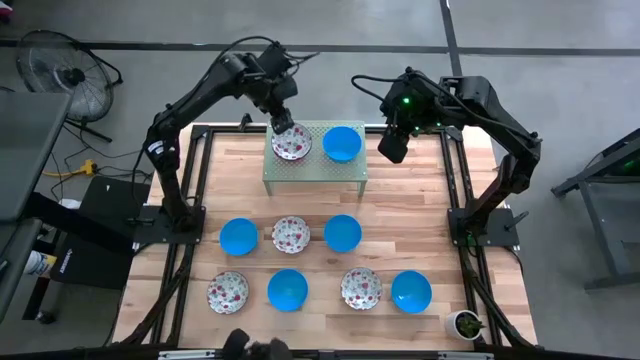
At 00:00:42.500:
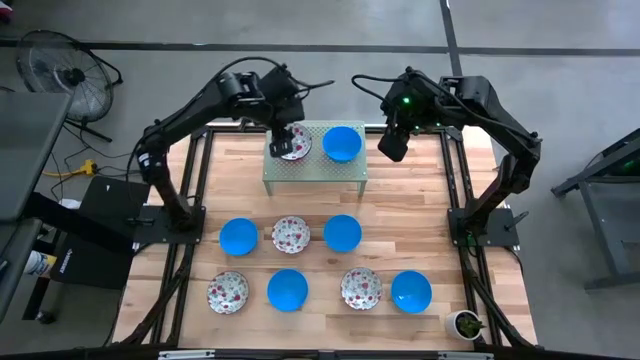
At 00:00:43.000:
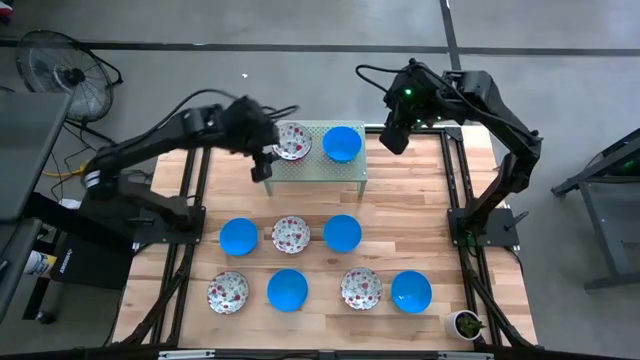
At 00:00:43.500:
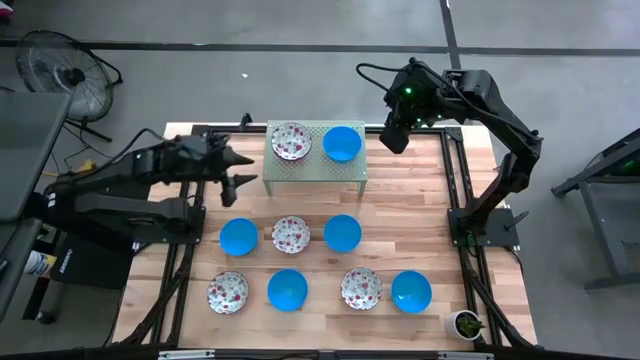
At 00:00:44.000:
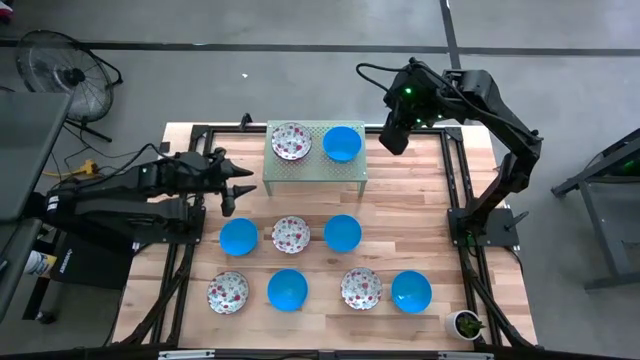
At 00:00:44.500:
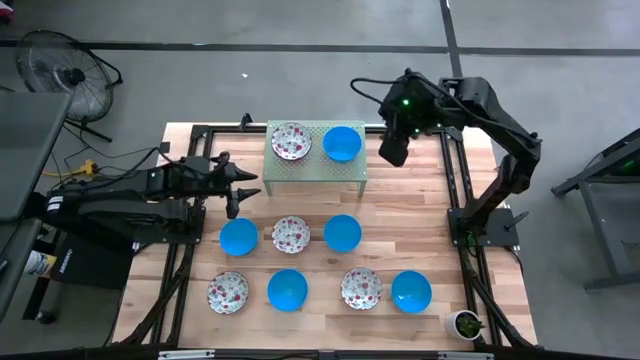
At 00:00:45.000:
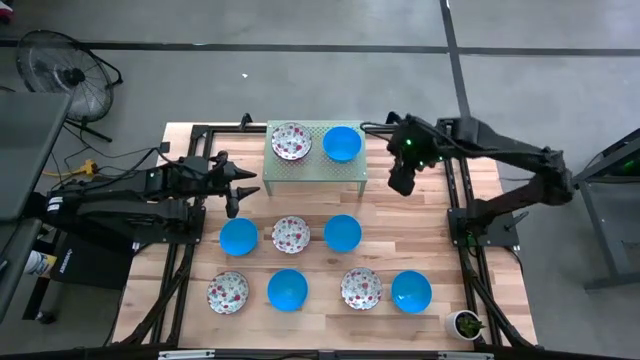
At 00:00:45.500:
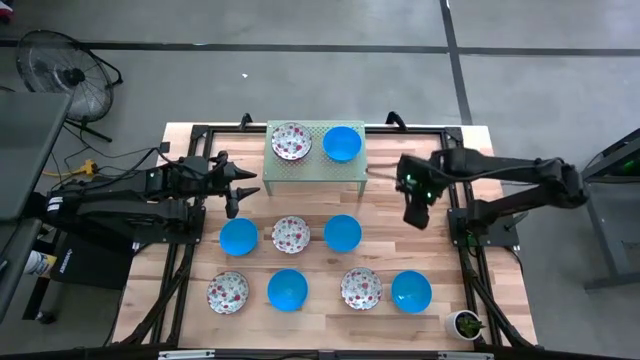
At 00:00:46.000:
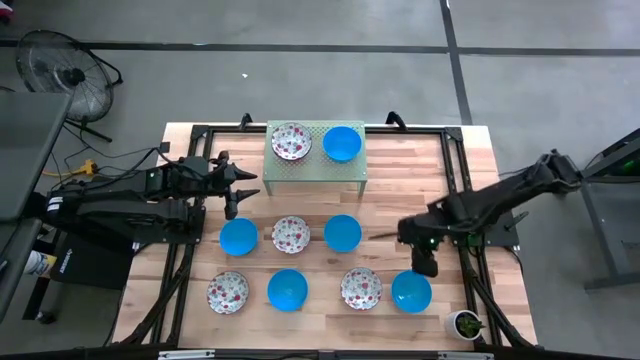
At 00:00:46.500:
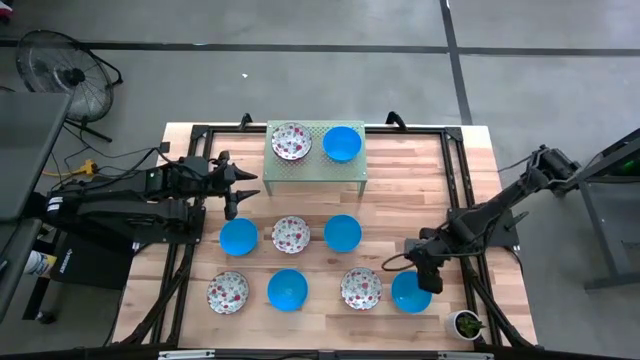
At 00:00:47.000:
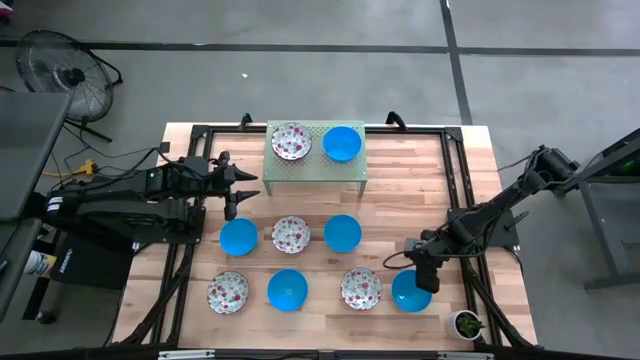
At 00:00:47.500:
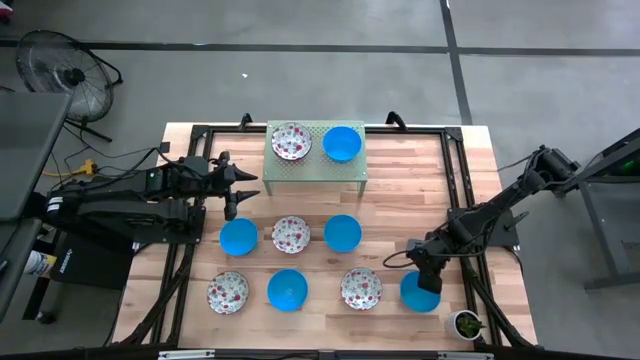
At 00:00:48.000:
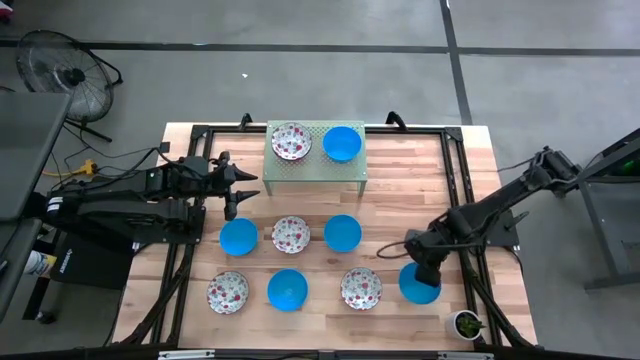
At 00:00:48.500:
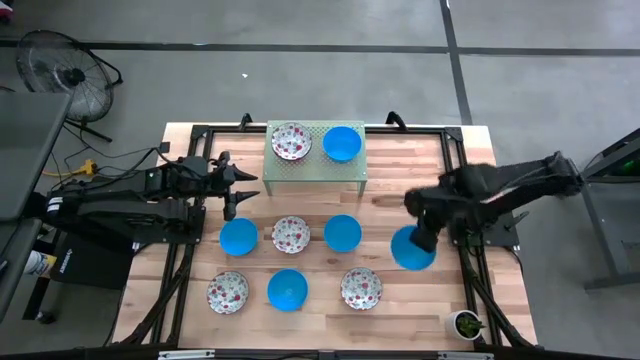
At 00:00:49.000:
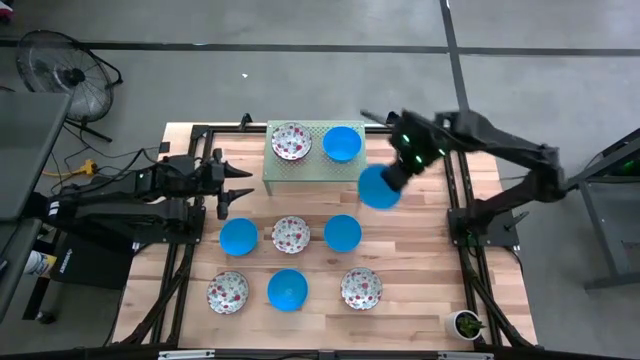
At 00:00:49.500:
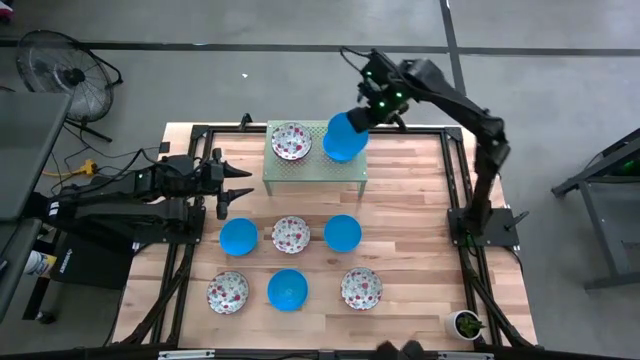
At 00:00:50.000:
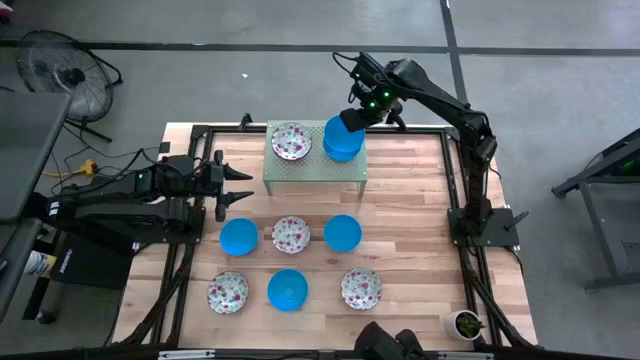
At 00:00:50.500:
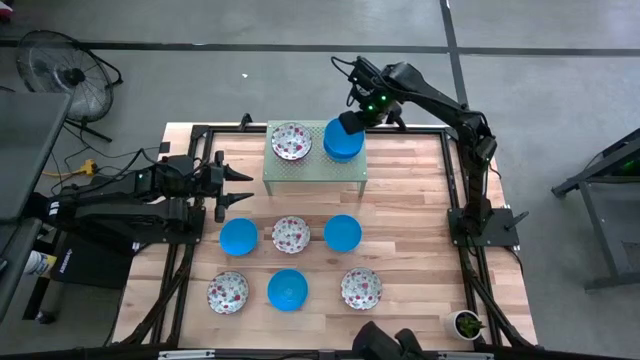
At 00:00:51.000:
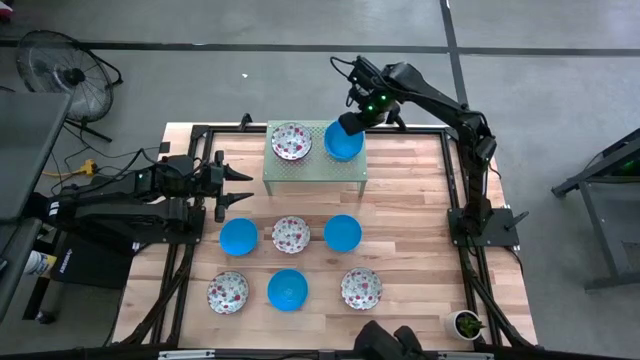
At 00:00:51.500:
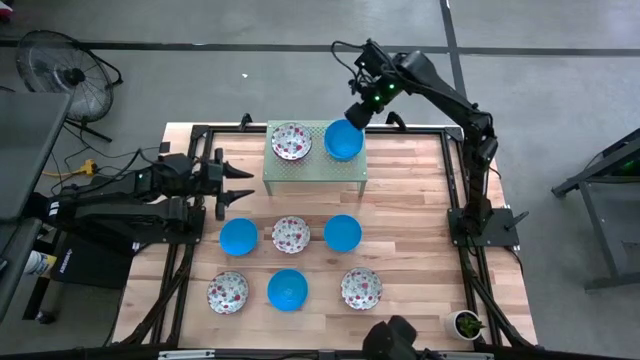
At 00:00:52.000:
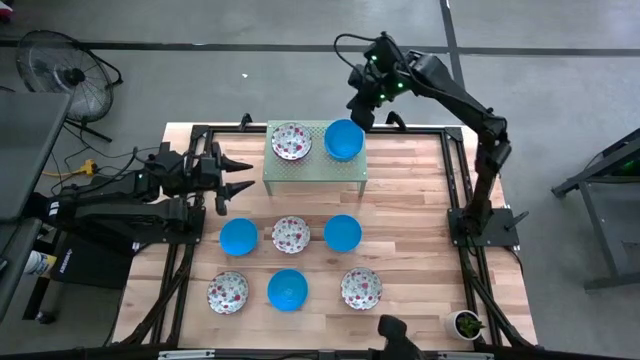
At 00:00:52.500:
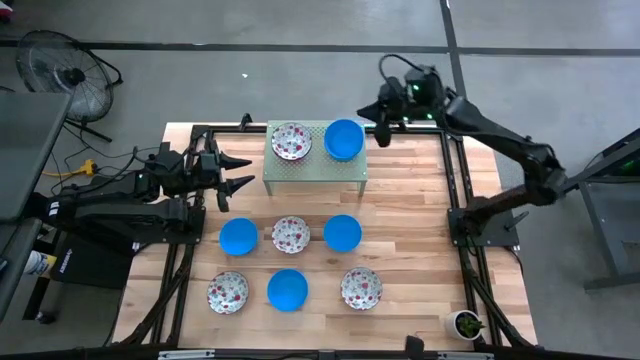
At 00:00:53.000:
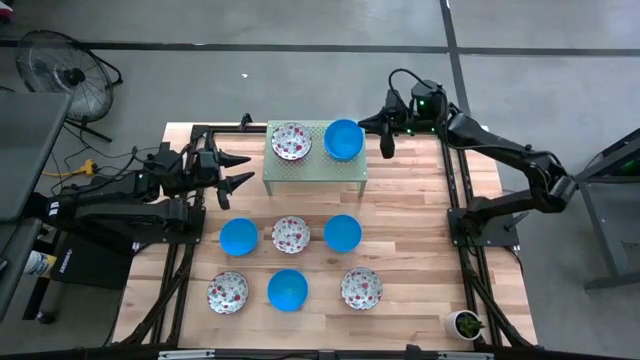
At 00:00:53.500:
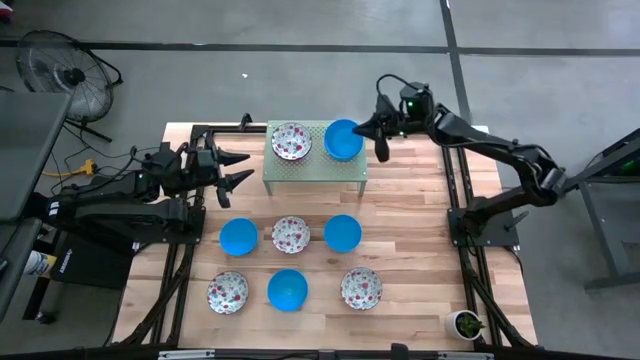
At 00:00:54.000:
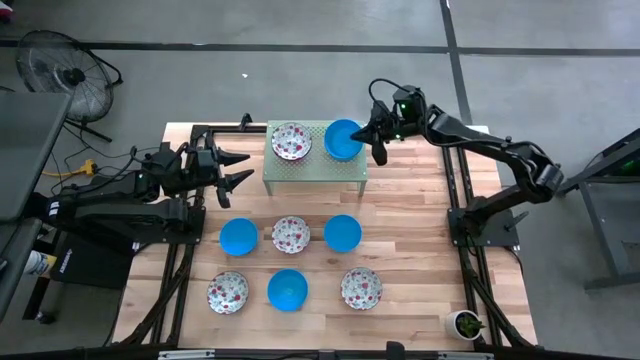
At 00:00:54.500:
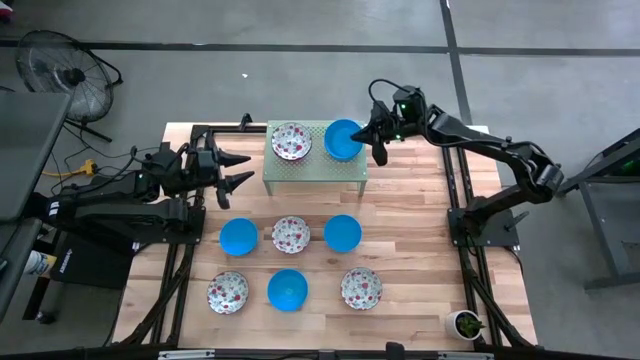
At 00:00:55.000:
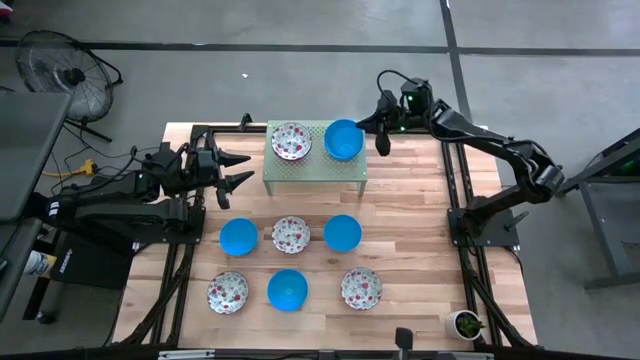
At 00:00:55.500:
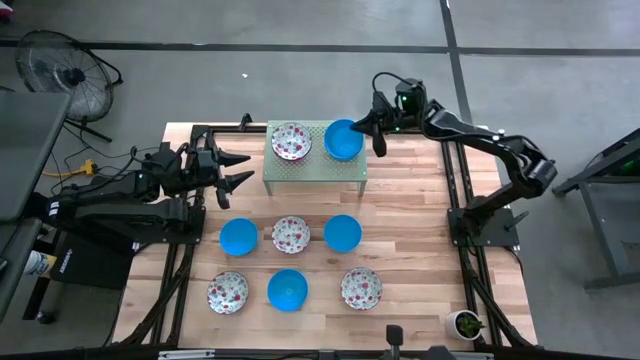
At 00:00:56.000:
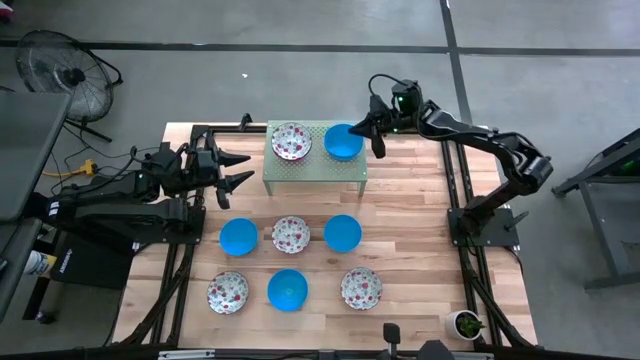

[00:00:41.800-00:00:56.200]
Task: Pick & Place Mini bowls
Stack the blue bowl on top of the other blue bowl on the shelf

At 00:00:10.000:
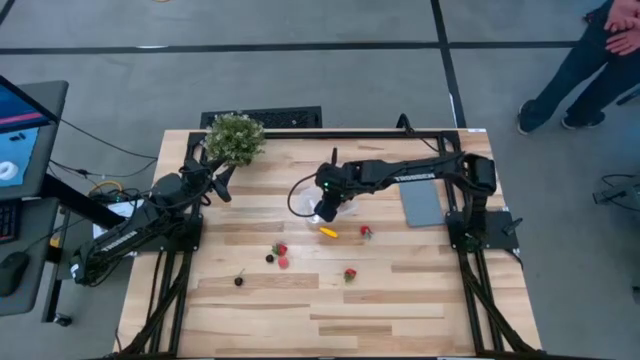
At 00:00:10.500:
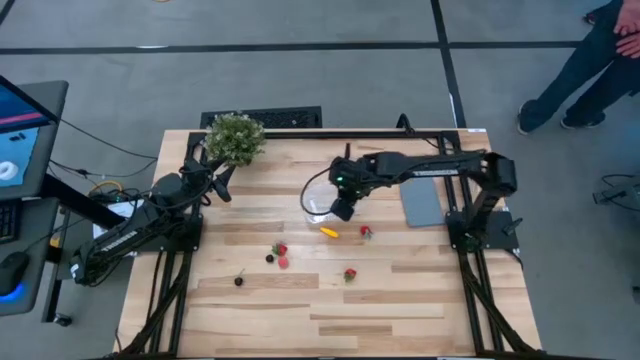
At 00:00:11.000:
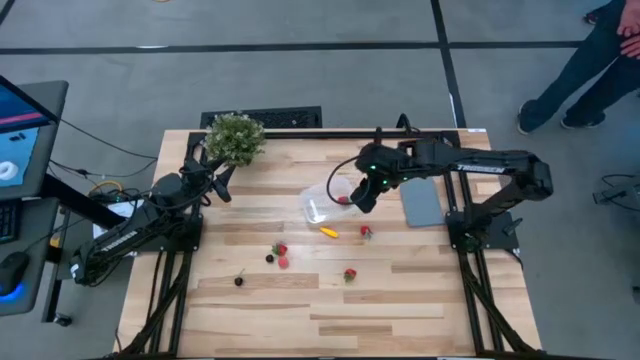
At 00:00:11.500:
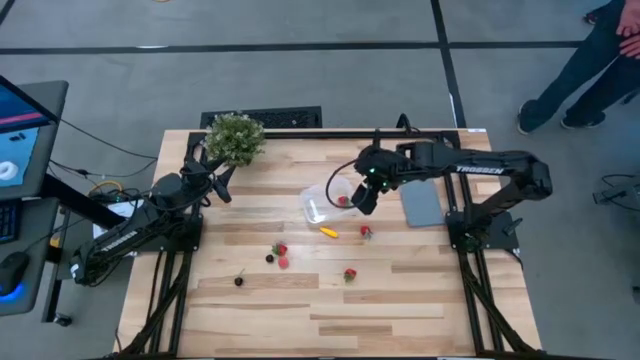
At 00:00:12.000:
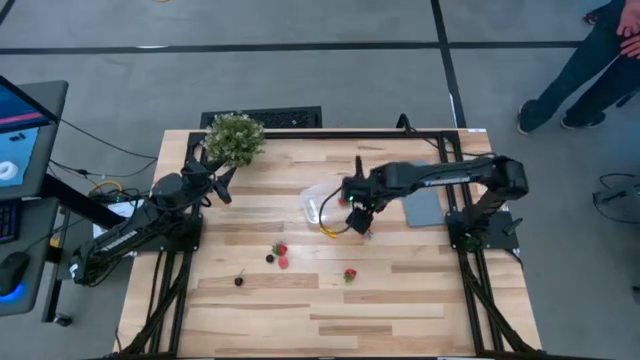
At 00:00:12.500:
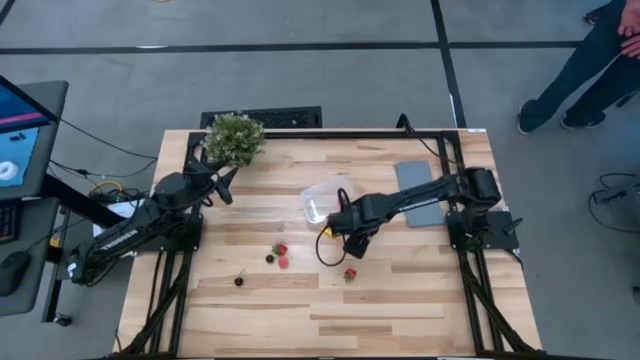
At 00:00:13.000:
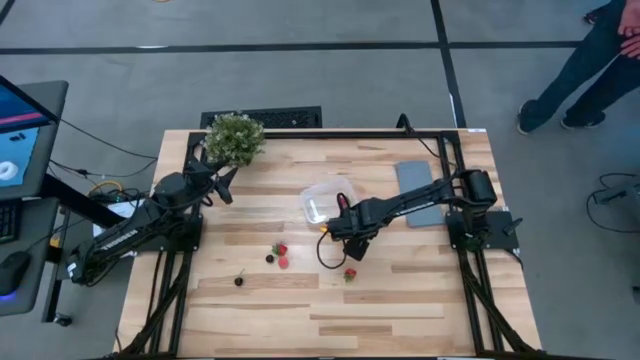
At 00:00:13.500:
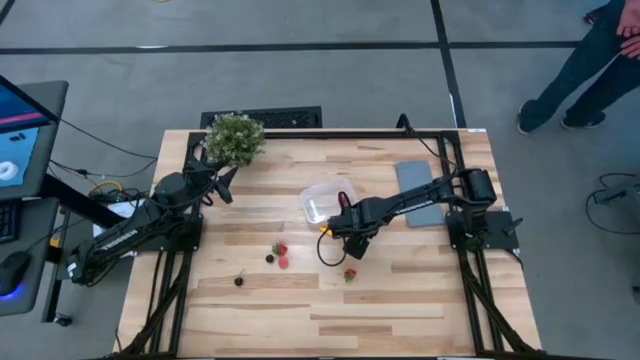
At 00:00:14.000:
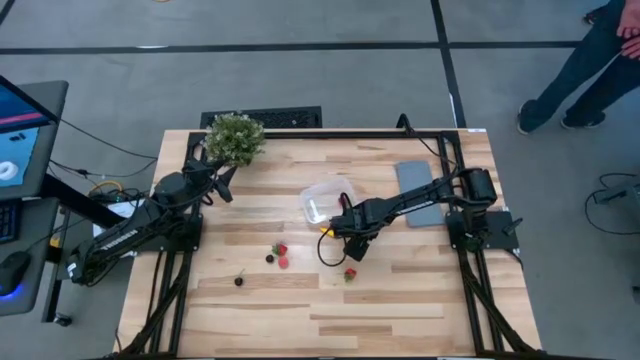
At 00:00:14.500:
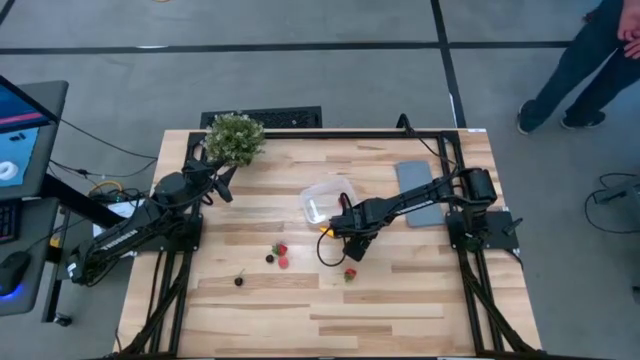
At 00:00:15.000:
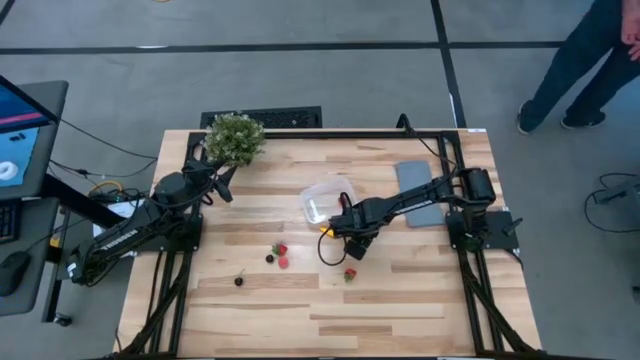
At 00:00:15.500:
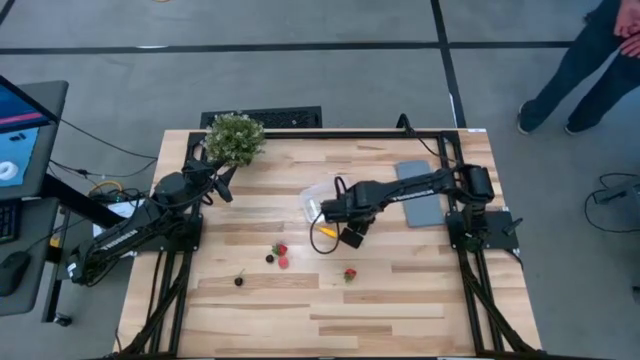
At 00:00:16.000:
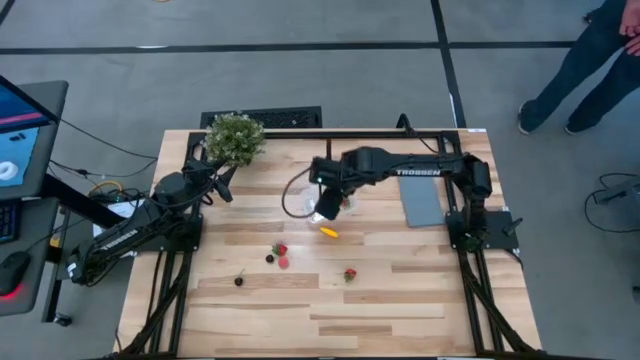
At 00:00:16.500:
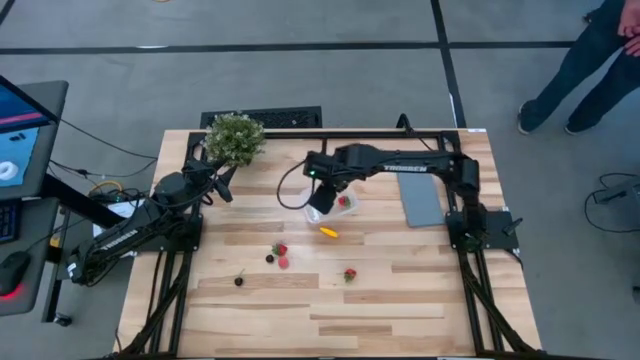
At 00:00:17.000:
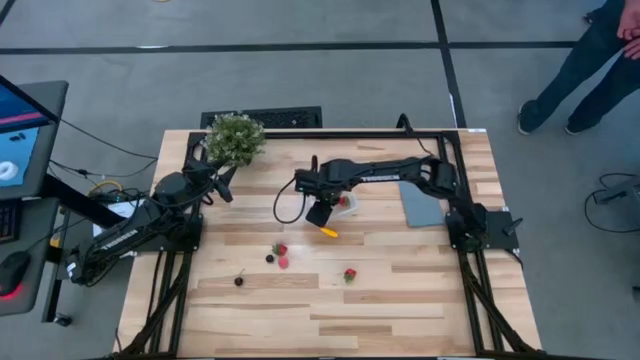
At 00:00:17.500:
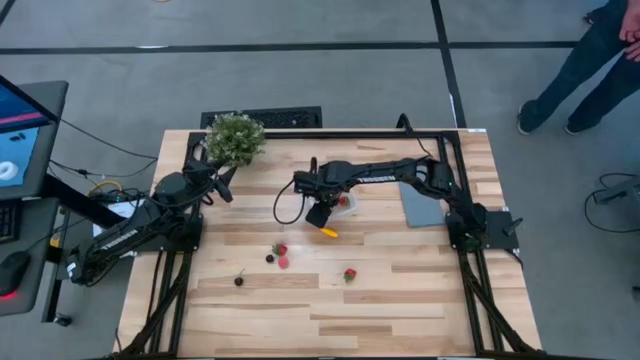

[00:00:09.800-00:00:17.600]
Task: Pick and placing Produce into tupperware
Put the strawberry into the transparent bin
